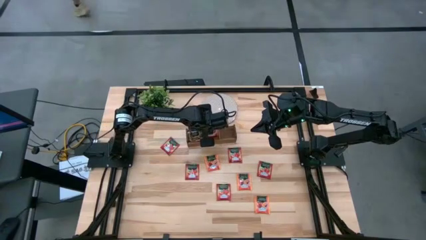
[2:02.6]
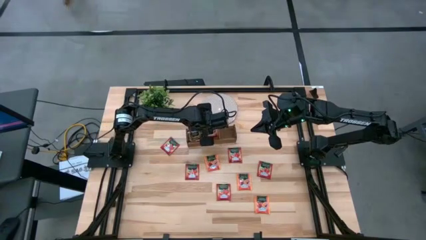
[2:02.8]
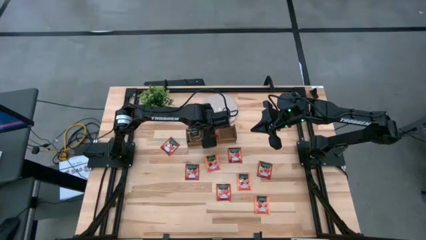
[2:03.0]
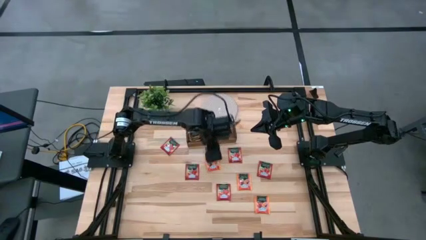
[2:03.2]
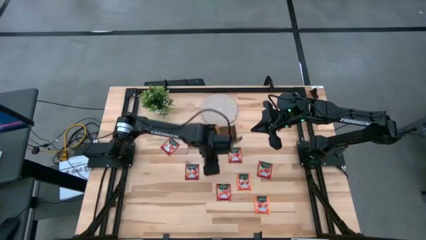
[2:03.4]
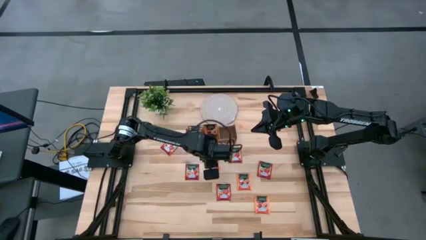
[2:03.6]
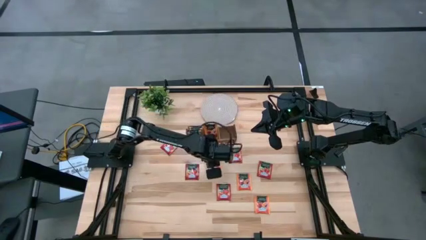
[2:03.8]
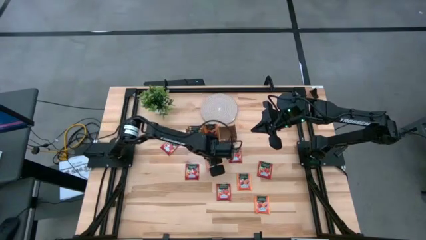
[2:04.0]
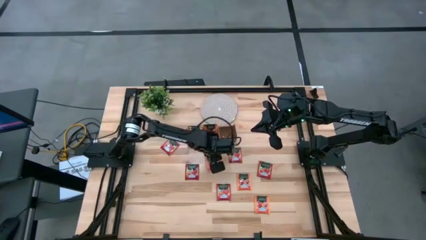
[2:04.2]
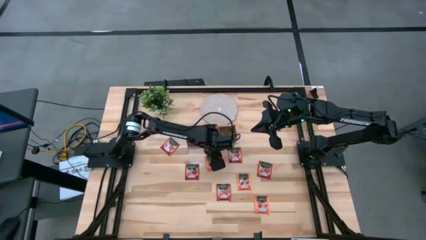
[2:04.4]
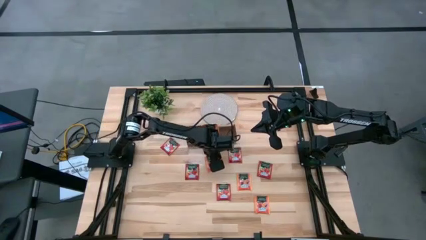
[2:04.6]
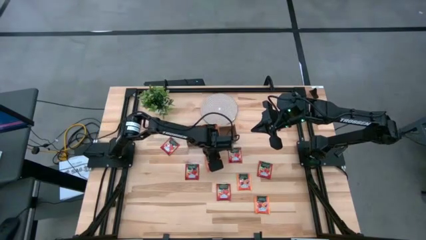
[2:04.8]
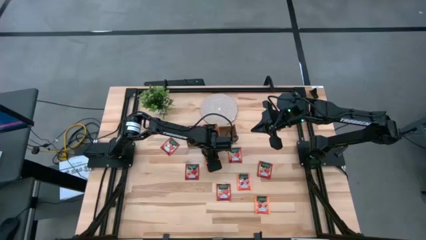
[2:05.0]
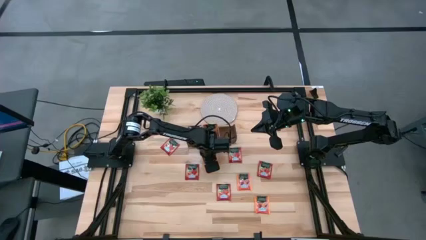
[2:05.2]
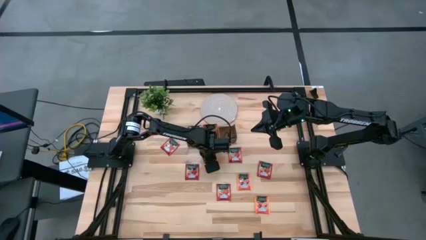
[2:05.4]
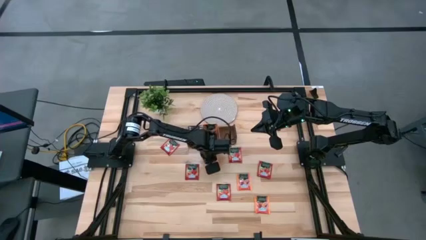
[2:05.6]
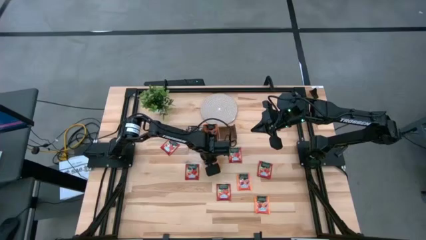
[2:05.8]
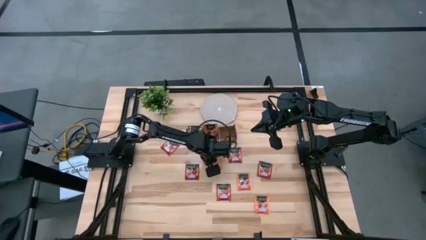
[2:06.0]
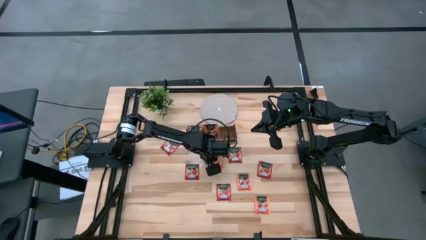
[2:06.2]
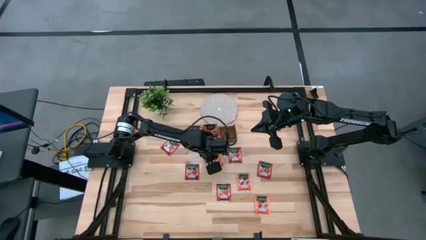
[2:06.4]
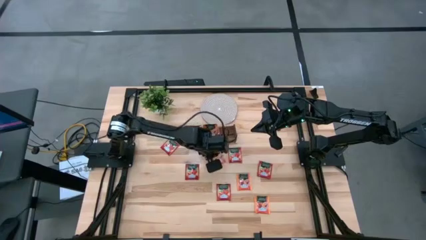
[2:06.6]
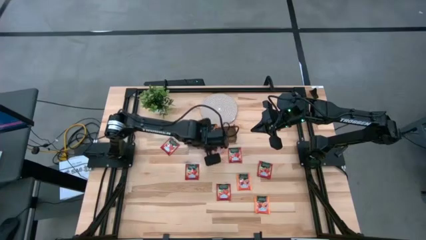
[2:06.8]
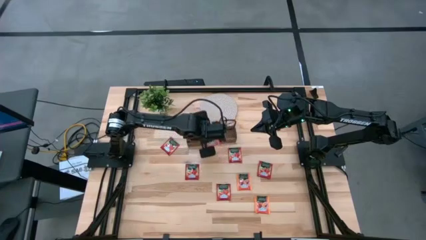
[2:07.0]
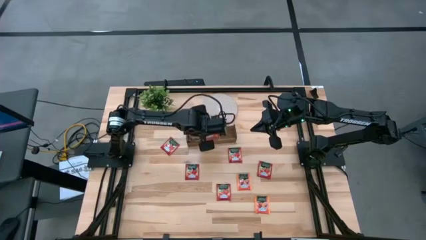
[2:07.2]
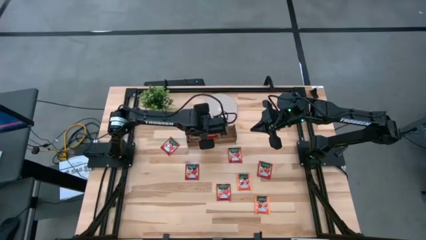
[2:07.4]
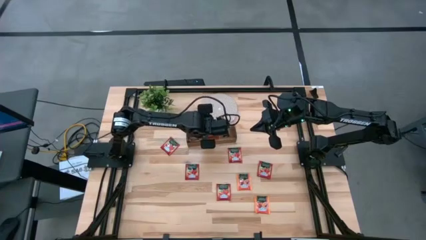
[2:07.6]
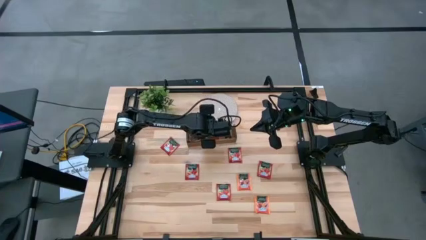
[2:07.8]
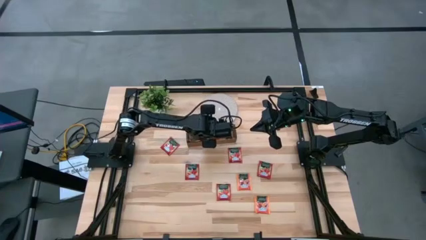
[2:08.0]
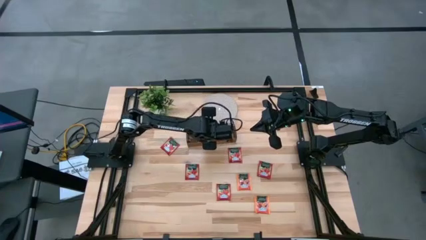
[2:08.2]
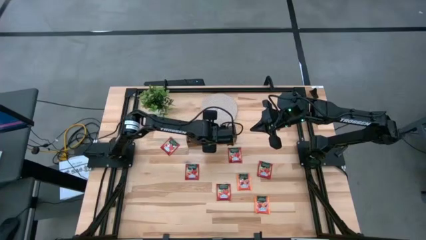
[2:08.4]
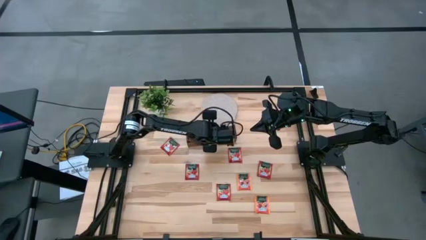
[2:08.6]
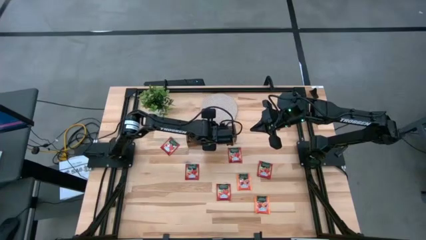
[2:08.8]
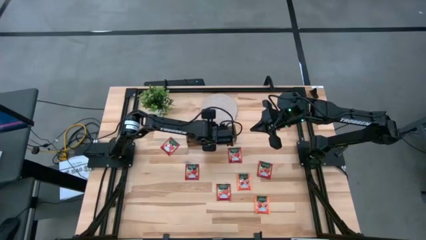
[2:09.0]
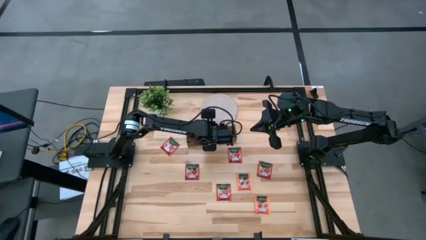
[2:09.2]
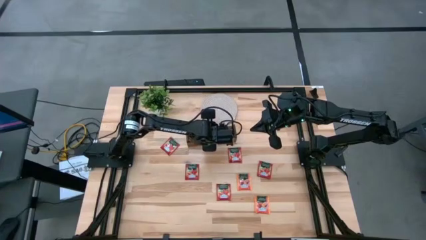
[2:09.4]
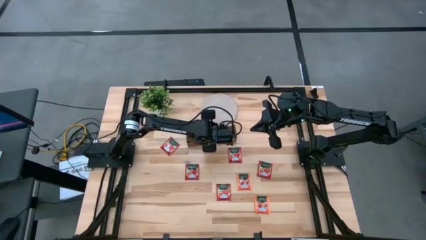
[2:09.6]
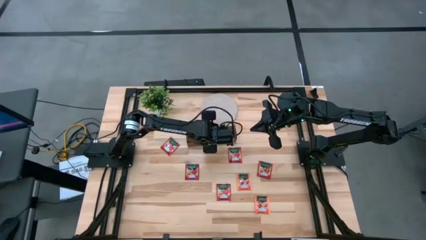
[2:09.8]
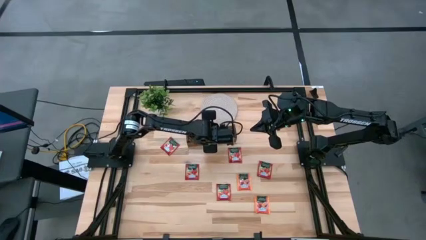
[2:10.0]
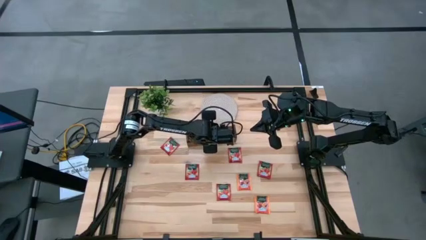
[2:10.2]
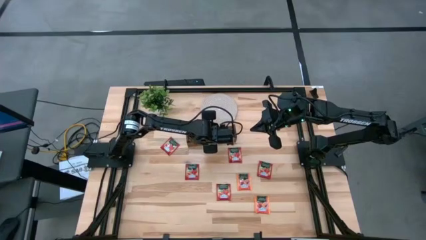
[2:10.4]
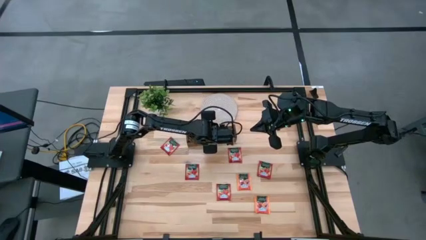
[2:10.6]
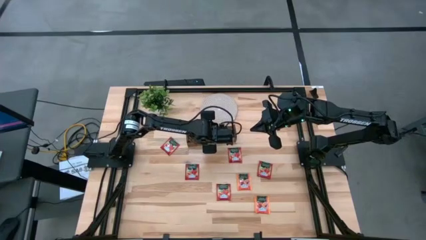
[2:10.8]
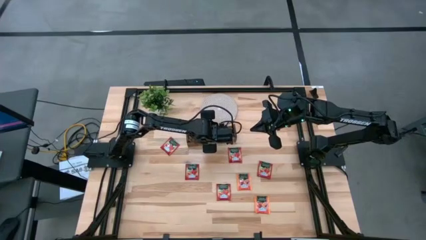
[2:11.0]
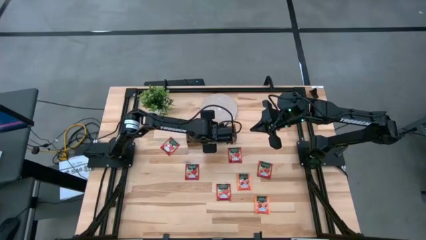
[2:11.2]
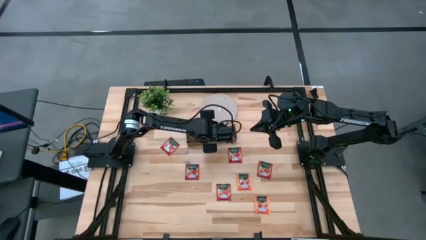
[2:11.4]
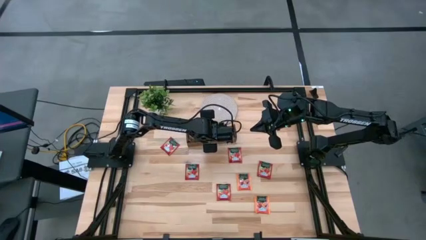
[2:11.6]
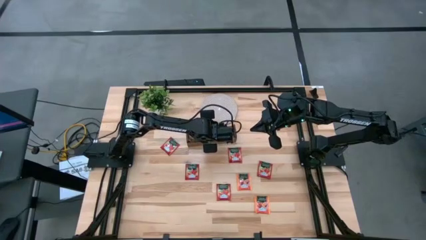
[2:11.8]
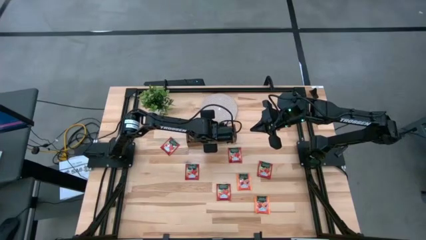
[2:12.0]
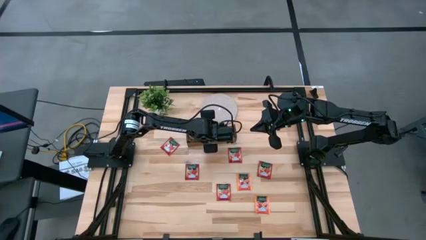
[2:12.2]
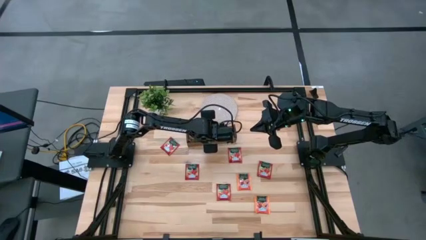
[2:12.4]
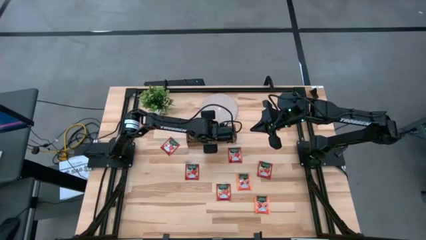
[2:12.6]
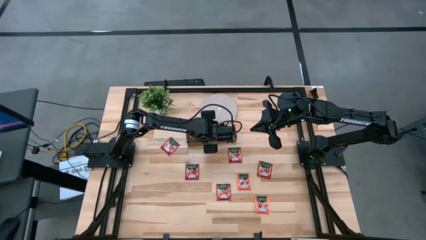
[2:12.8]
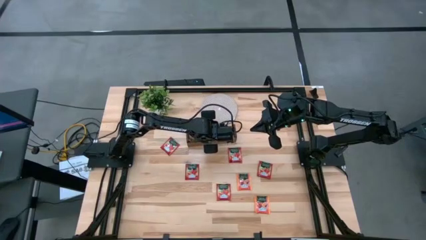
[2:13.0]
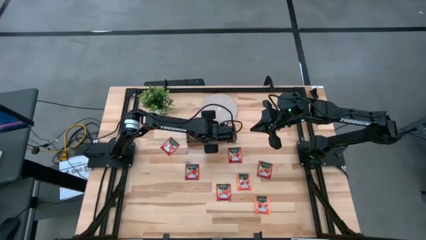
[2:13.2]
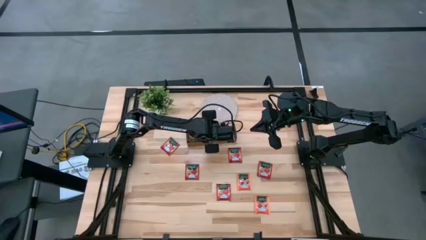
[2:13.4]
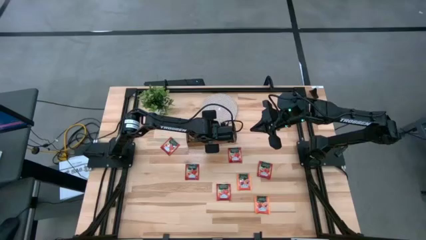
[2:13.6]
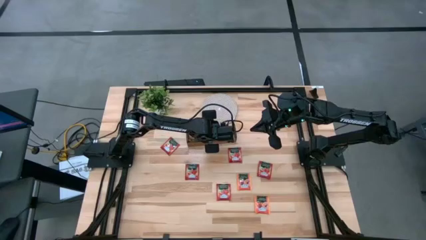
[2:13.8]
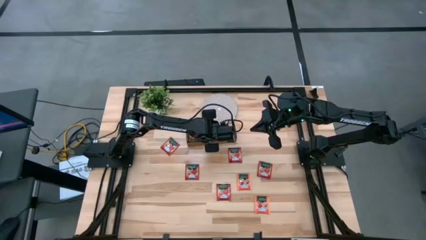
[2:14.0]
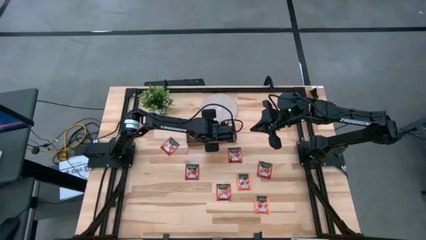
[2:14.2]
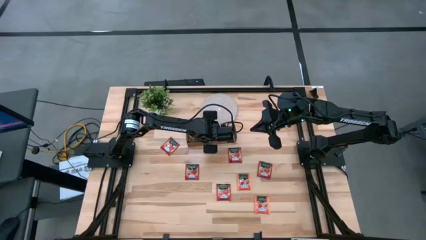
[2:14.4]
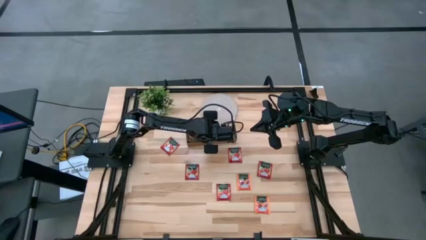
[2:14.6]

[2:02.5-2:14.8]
Task: Pick & Place Tea
Put the orange tea bag into the middle of the wooden organizer

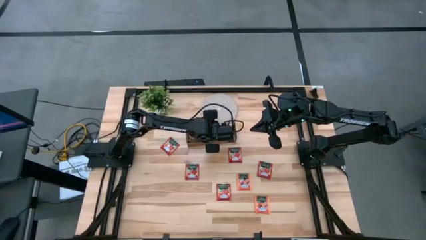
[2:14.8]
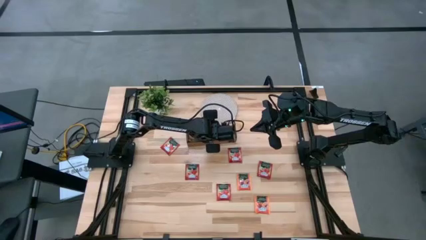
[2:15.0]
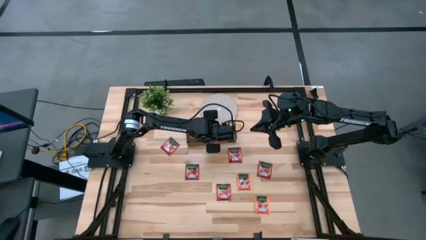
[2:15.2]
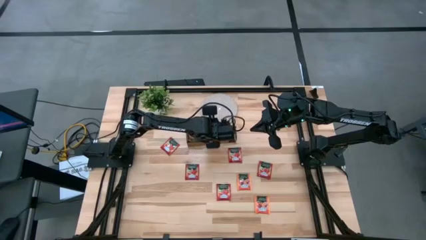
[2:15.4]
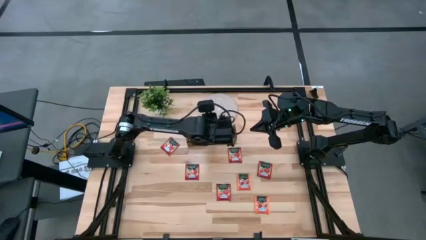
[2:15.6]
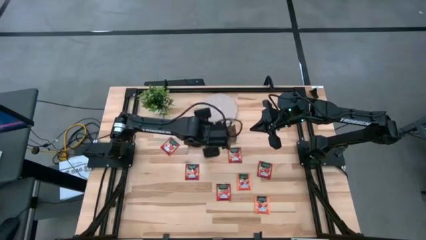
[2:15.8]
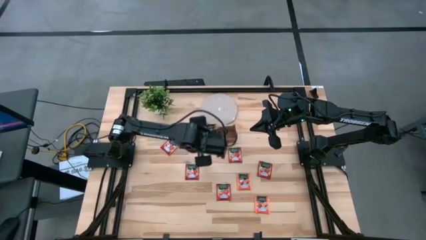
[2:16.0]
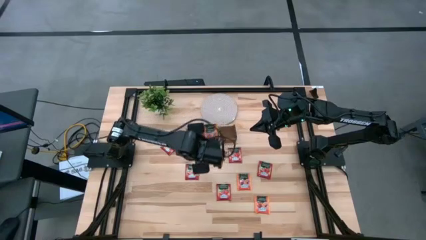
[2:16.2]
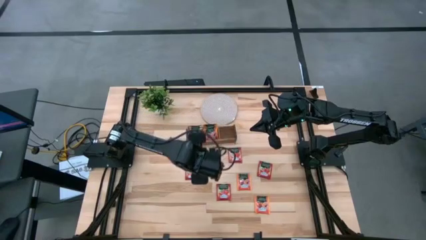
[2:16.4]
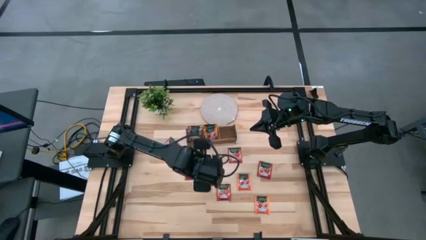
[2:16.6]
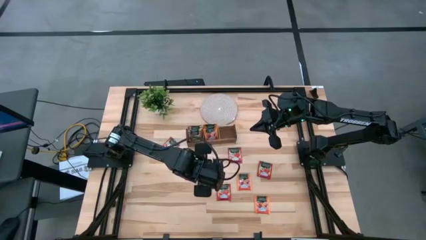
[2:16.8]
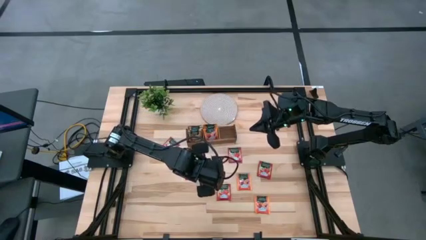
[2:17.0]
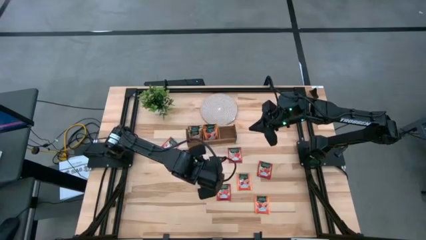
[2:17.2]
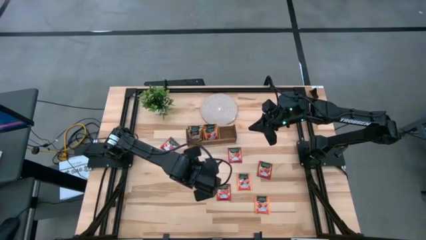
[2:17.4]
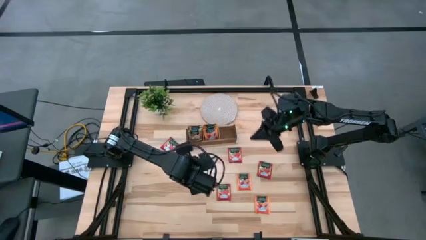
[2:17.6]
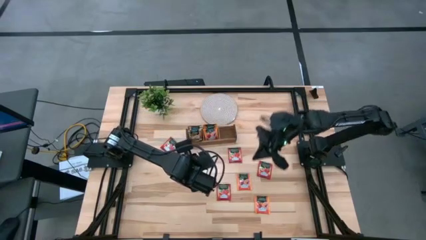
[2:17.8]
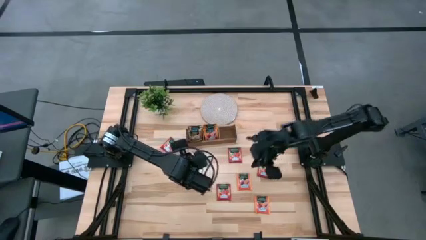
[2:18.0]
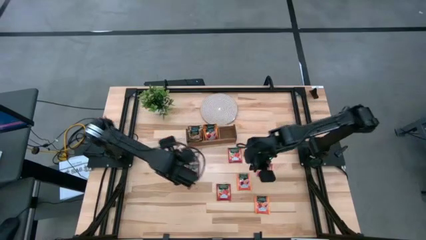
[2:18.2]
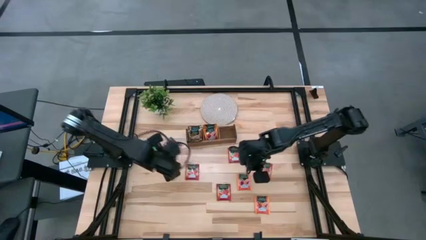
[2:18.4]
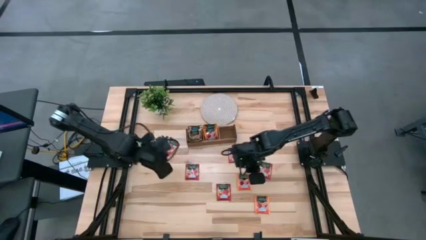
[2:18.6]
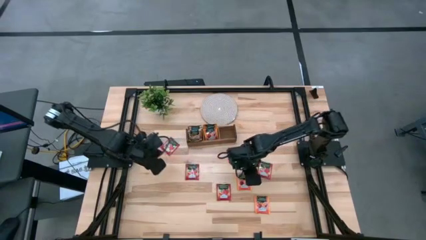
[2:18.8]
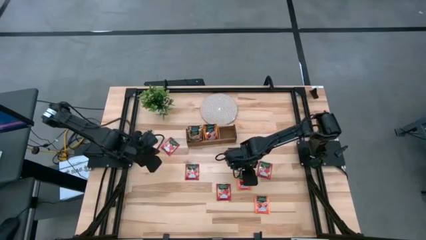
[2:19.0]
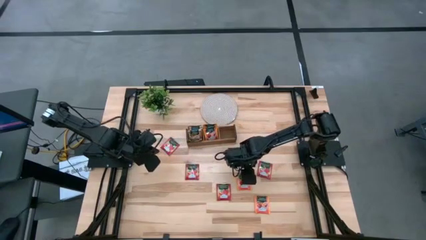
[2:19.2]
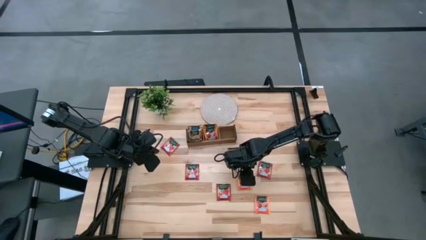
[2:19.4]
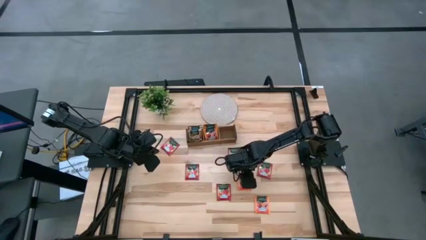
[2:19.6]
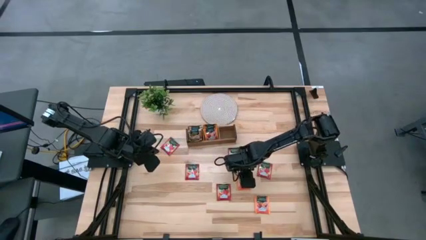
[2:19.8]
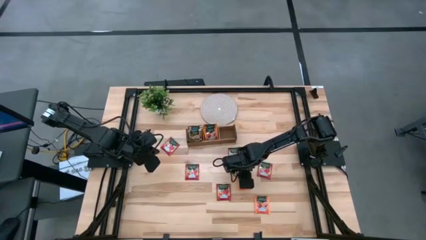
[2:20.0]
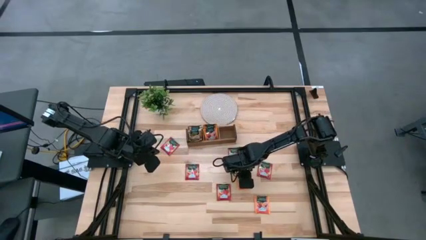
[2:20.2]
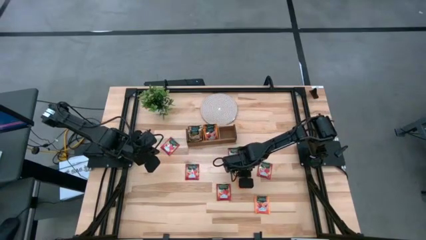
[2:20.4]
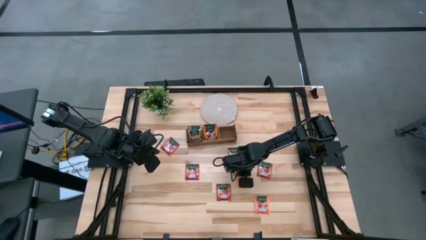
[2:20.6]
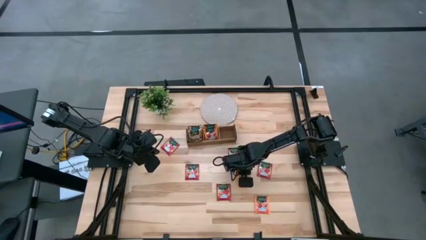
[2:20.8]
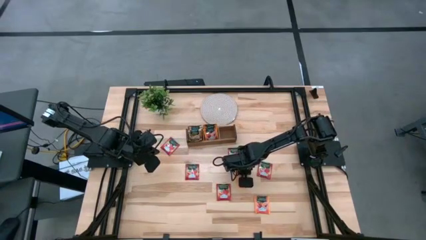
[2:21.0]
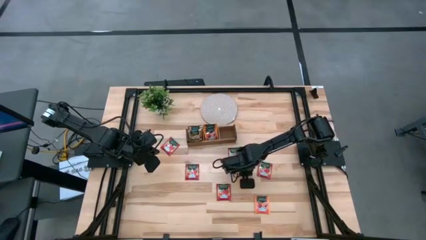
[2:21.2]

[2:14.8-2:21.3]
Put the orange tea bag into the middle of the wooden organizer
